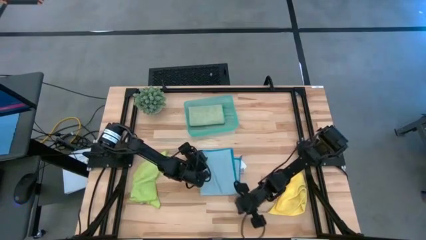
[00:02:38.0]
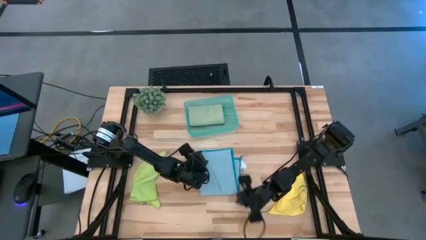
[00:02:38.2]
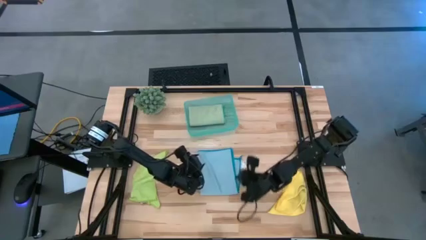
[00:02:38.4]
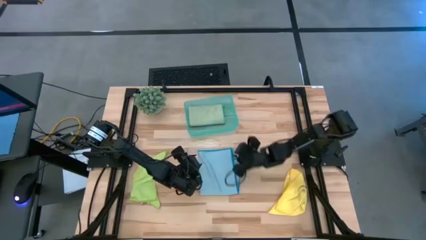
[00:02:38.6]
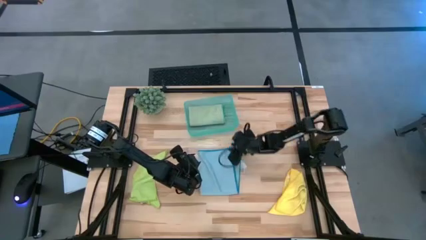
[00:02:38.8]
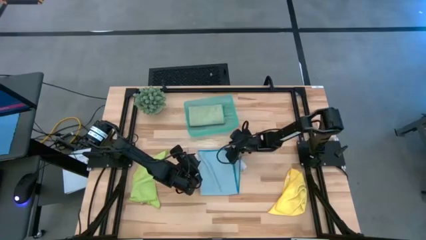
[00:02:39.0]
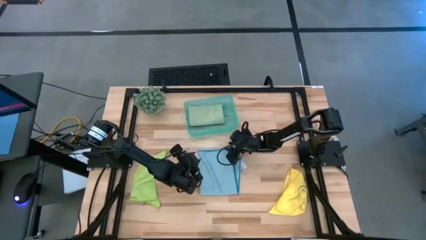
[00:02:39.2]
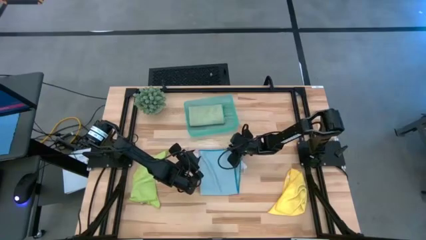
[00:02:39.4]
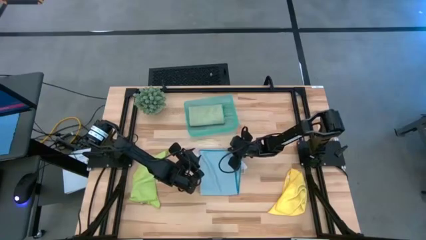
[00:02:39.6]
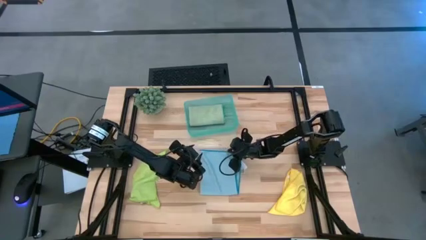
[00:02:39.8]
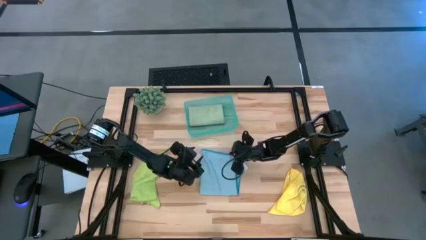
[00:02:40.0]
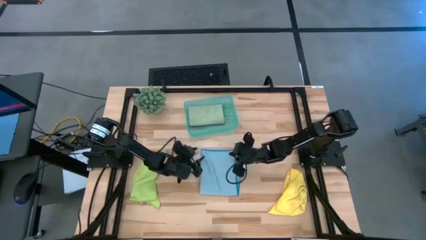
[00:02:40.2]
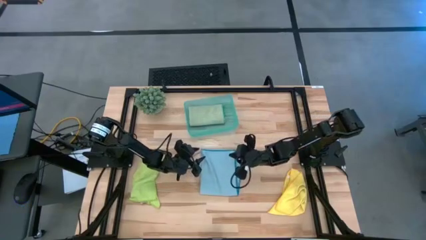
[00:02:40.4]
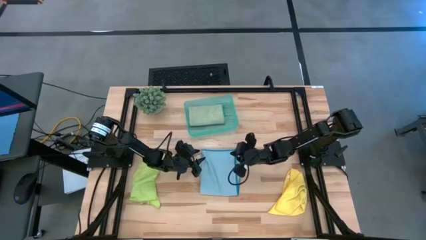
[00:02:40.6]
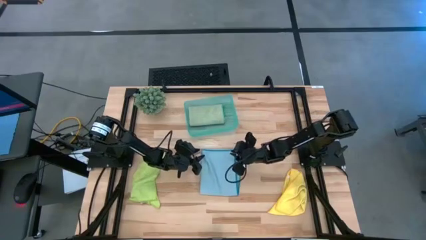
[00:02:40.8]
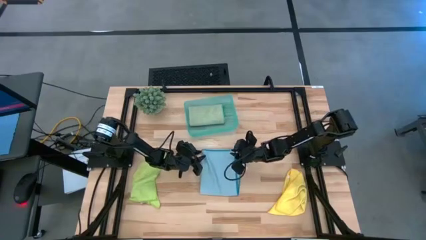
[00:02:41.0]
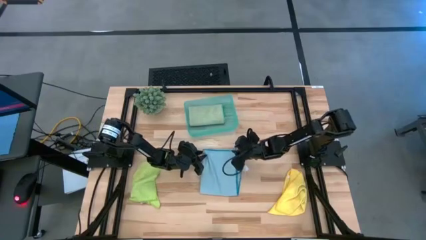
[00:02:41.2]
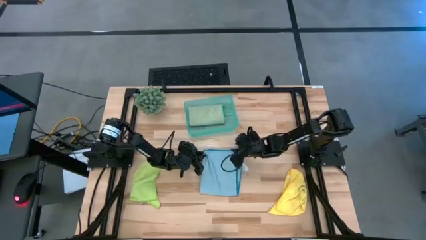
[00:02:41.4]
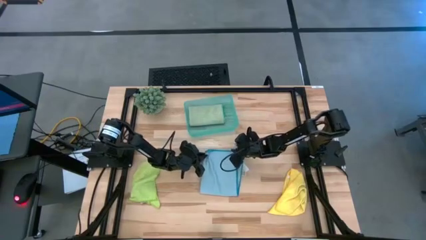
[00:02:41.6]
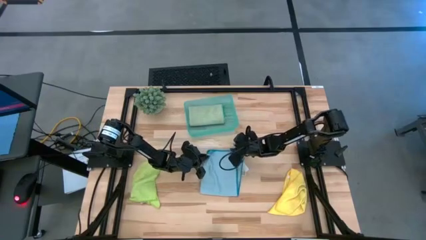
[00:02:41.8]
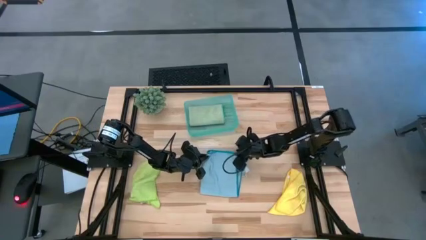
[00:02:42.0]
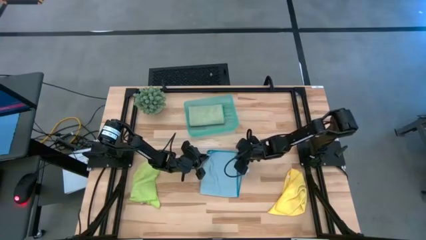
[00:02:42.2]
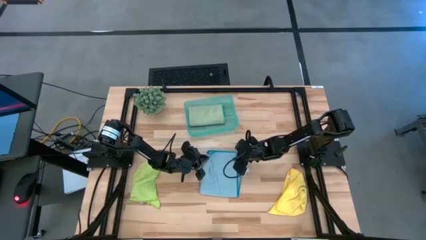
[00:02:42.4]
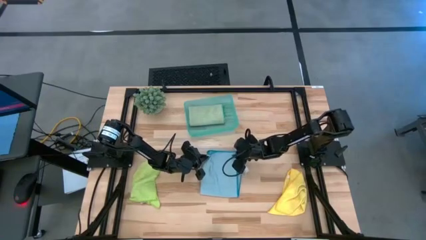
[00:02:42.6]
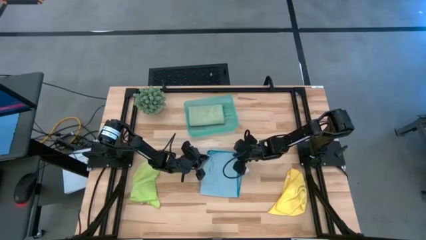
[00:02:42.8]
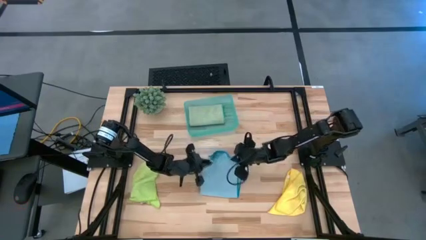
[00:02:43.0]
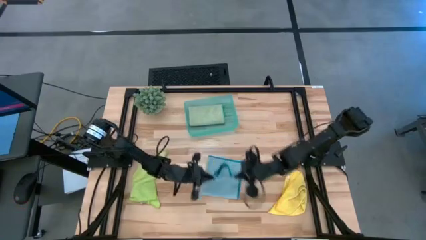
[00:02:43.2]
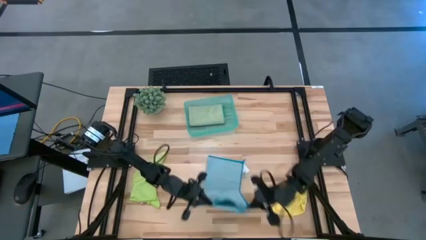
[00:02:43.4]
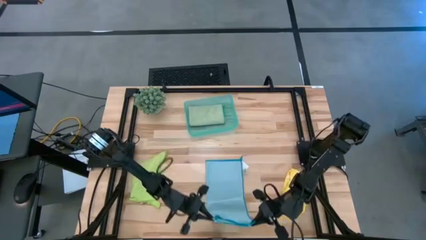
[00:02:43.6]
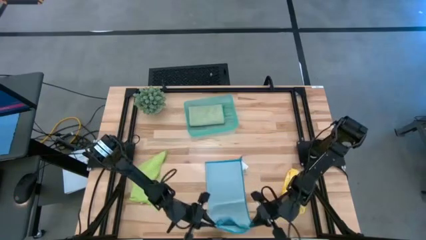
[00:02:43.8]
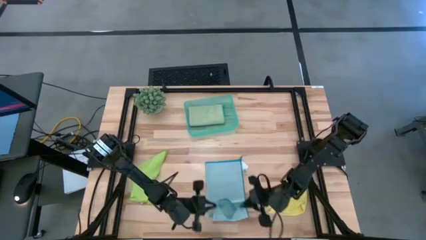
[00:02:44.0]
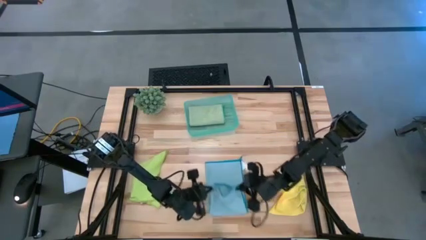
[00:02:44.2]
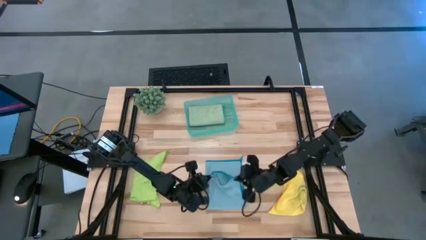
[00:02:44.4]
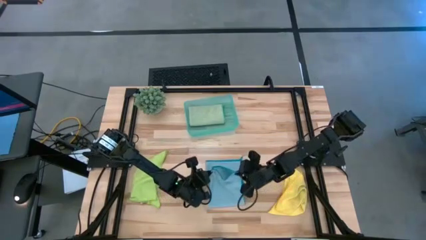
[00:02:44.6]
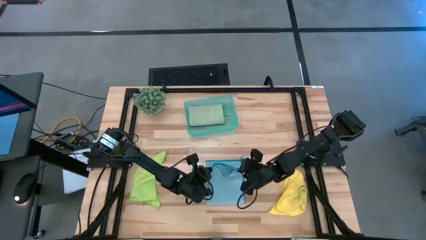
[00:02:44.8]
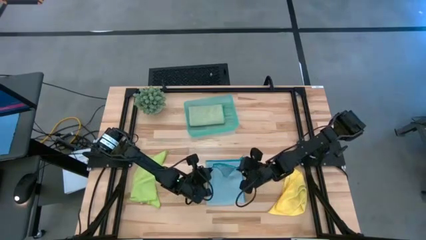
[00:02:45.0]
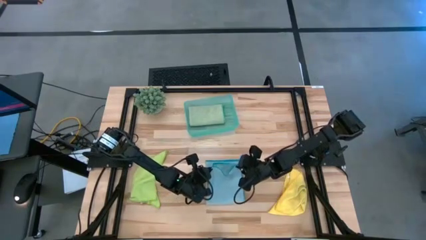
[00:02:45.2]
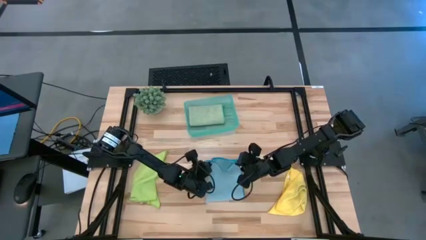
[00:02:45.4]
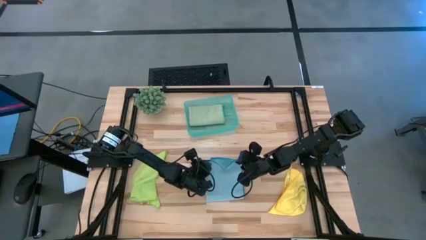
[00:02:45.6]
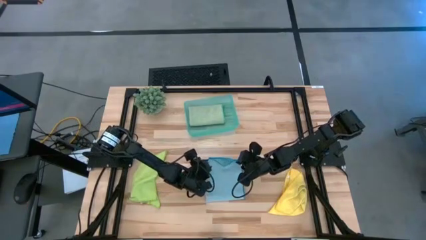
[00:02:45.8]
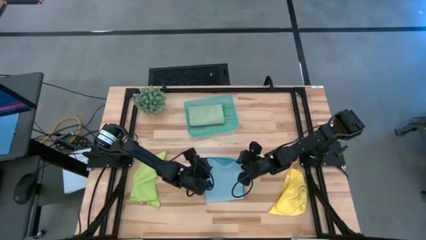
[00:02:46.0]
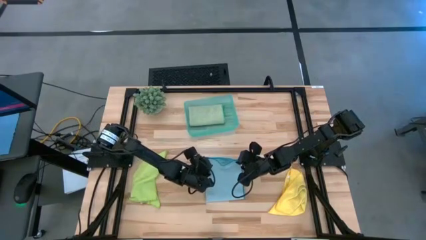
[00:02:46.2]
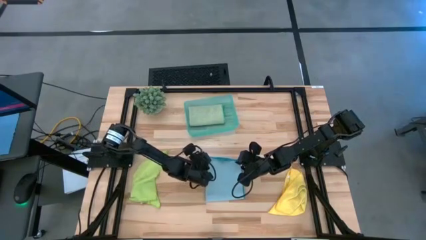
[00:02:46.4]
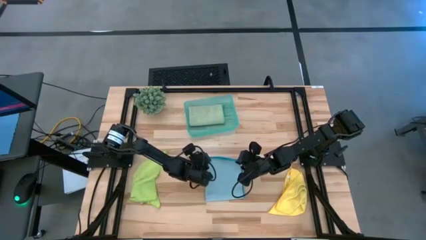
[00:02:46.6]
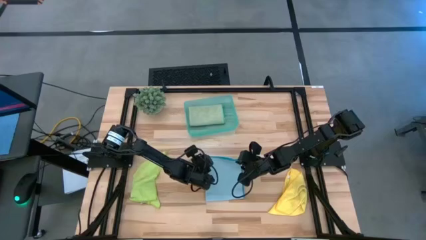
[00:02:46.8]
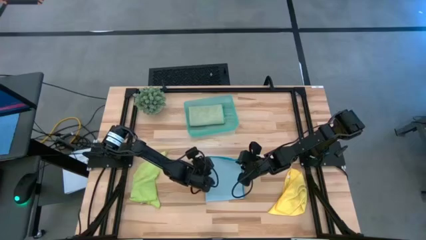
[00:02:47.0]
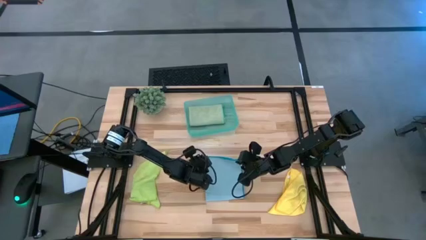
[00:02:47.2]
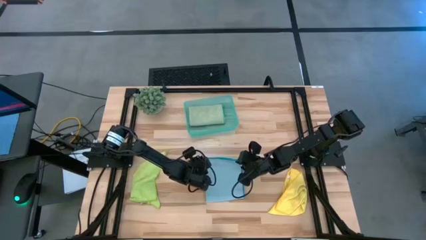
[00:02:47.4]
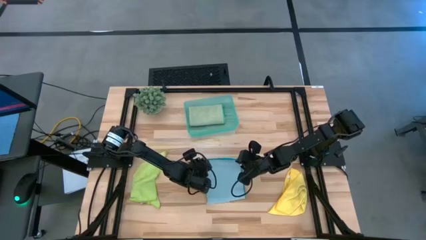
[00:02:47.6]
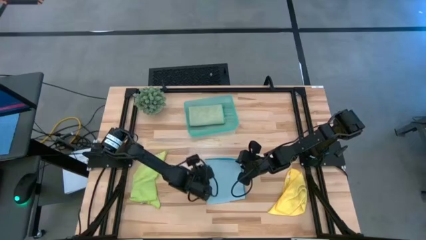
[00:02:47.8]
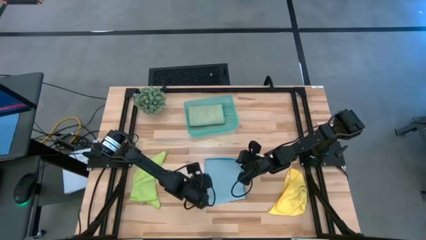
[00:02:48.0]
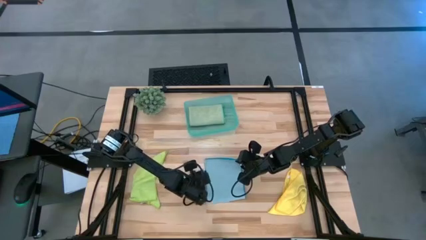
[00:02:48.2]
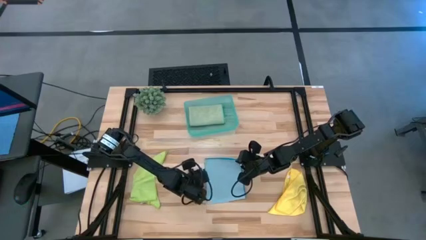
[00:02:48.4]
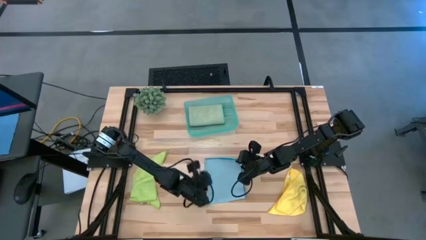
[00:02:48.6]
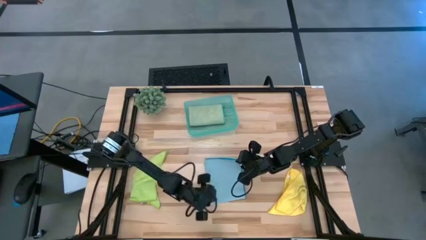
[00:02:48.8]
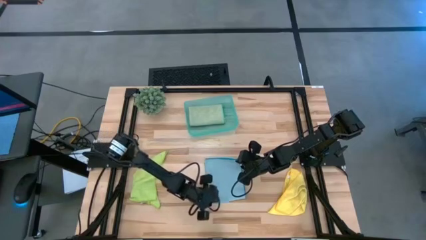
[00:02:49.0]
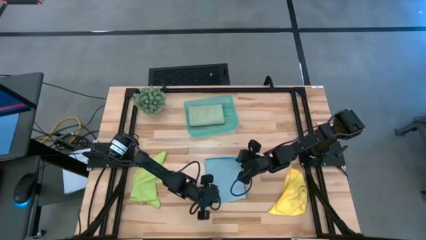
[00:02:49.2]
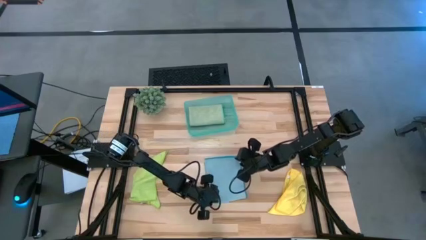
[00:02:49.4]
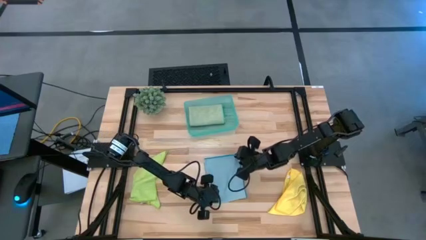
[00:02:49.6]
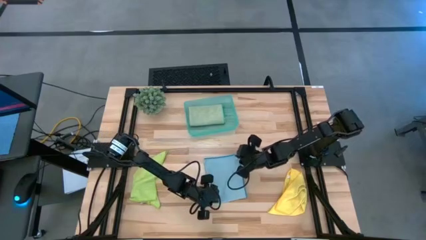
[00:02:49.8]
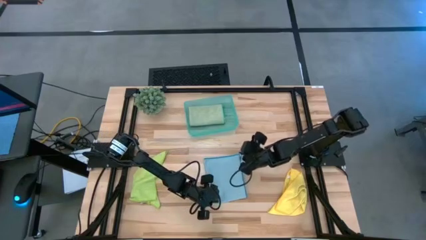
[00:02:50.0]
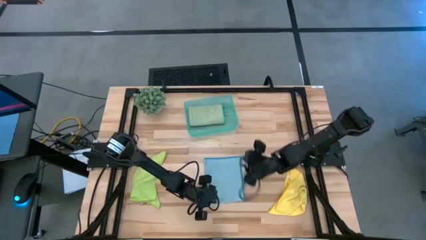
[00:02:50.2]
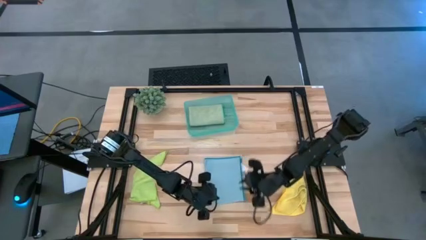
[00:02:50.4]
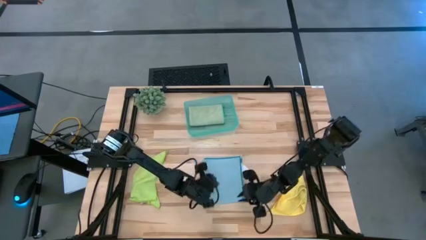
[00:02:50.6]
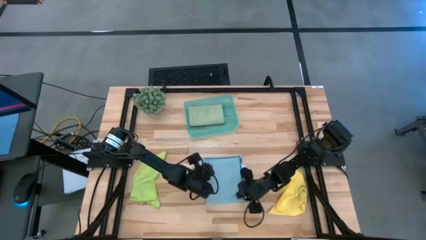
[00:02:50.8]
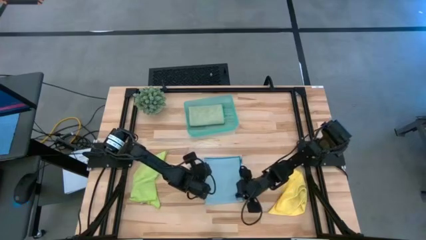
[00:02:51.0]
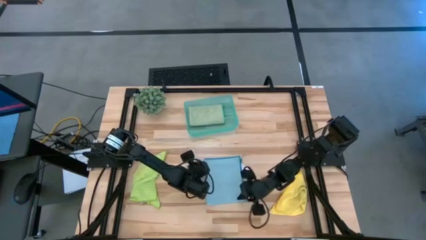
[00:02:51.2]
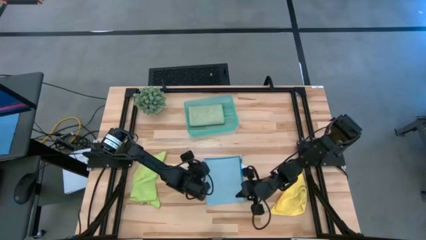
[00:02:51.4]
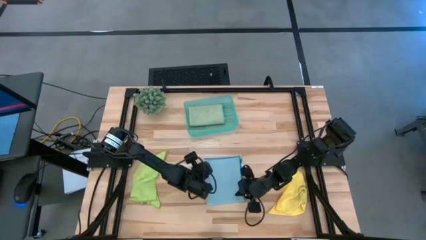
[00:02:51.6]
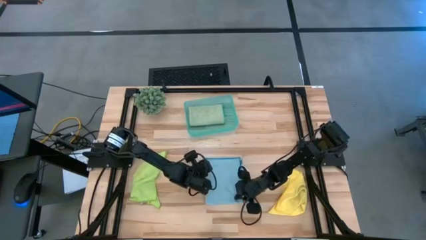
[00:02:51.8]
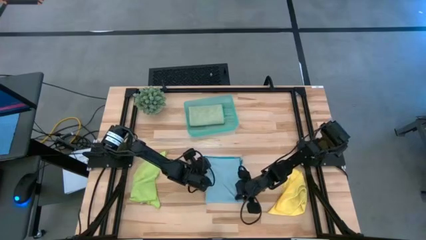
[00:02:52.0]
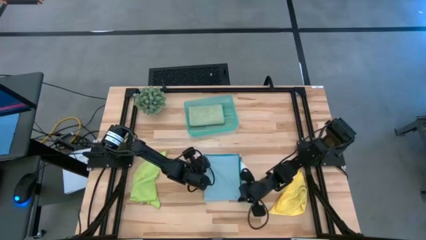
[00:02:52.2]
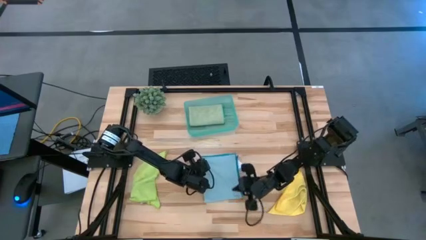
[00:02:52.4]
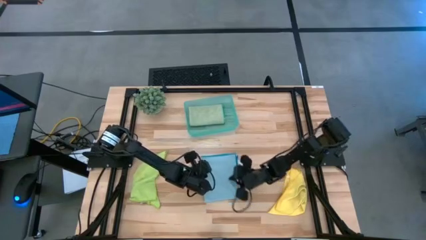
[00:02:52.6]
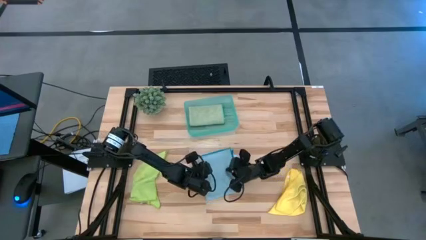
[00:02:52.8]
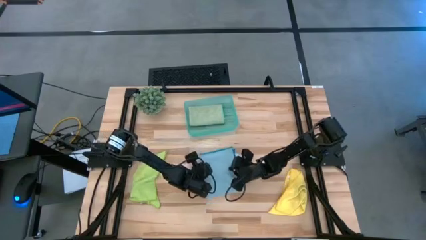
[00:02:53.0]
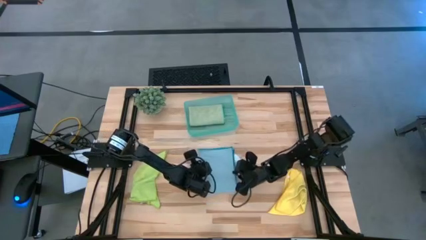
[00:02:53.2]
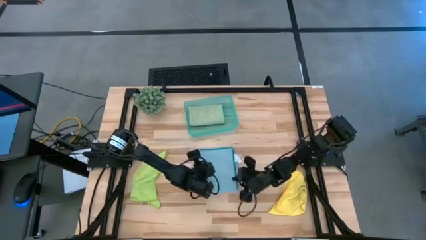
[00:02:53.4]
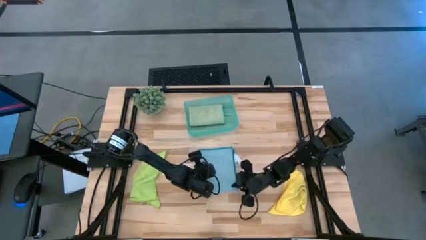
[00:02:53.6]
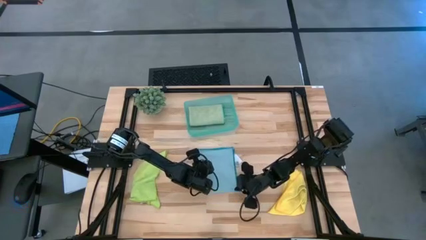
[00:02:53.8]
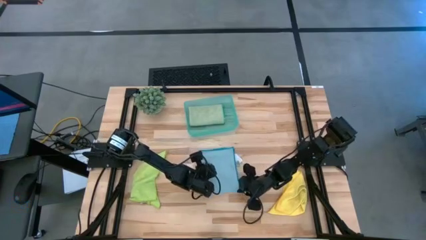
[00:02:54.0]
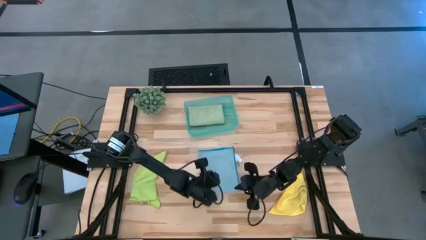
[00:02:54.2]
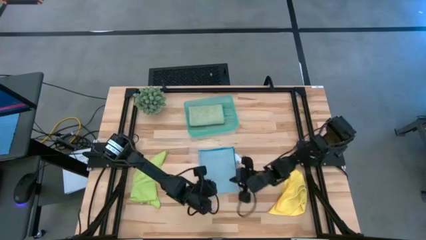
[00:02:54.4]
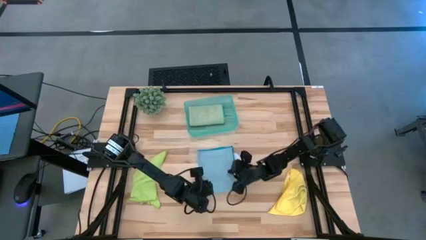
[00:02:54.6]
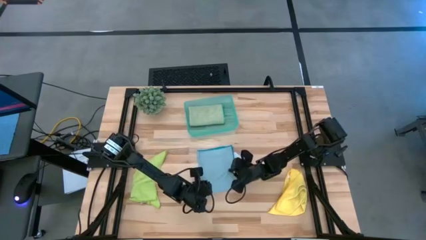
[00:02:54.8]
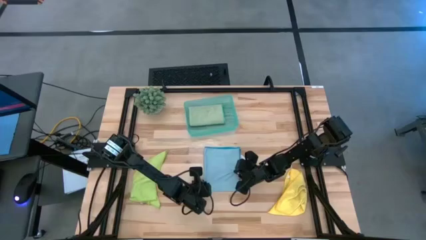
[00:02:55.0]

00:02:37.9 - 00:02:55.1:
Task: Fold microfiber towels
Fold the blue towel
